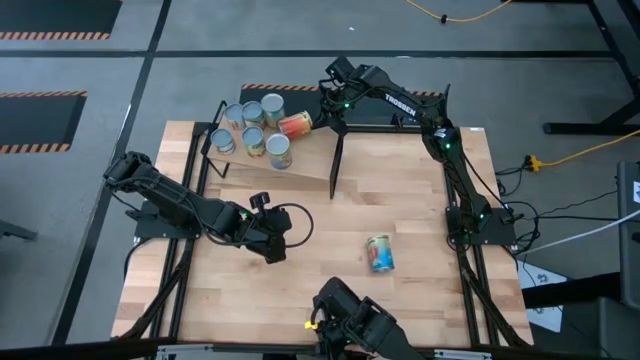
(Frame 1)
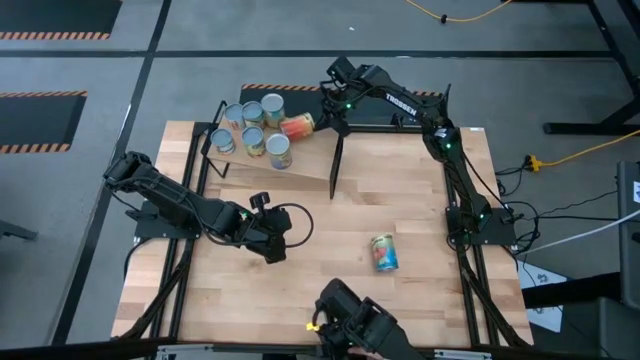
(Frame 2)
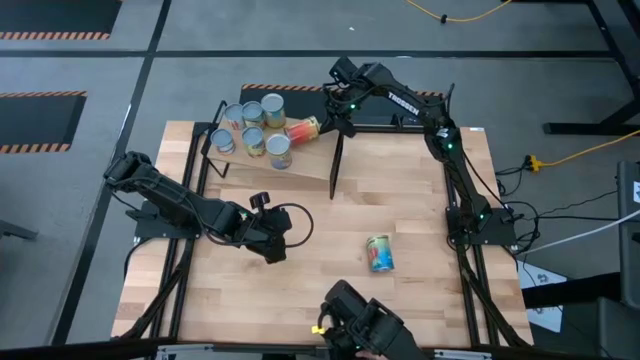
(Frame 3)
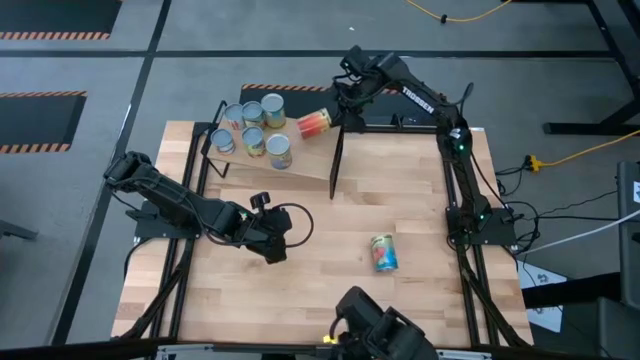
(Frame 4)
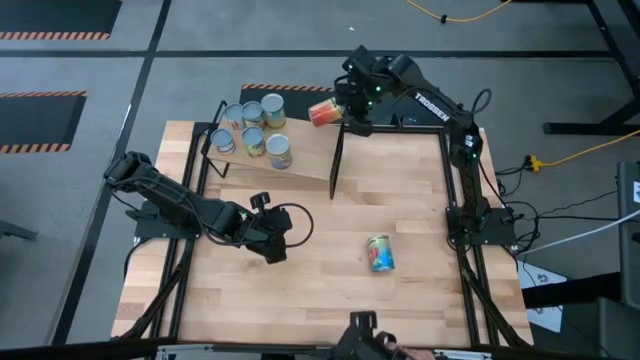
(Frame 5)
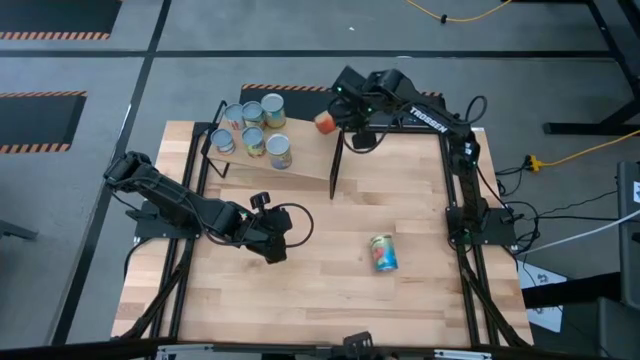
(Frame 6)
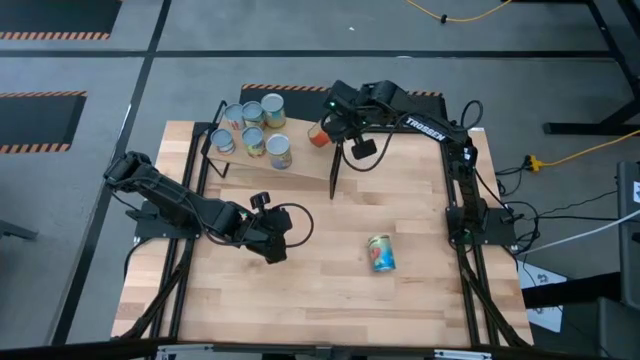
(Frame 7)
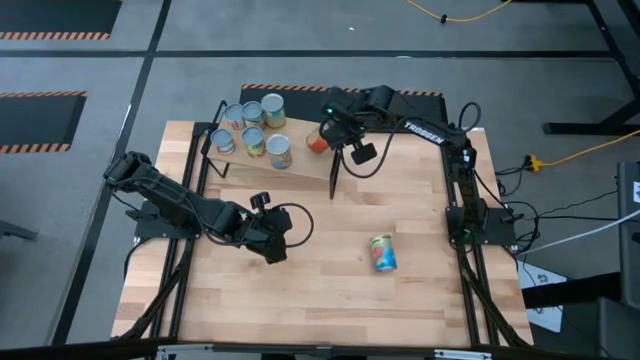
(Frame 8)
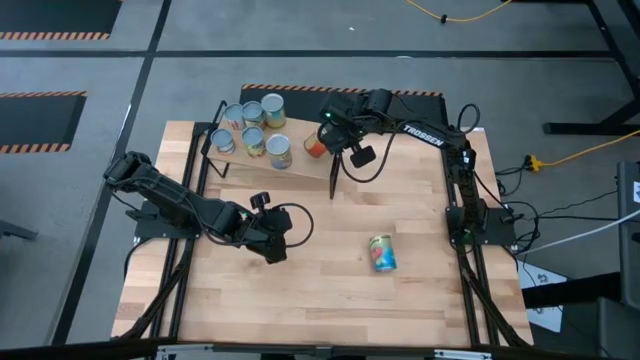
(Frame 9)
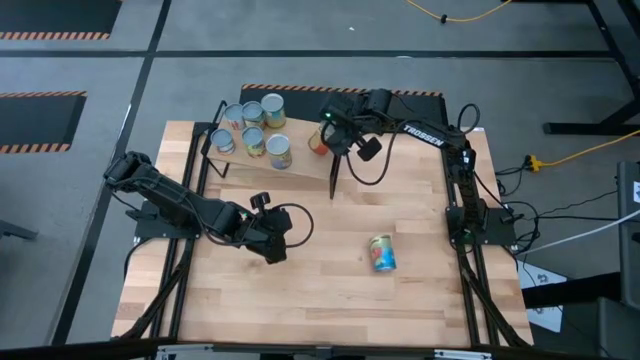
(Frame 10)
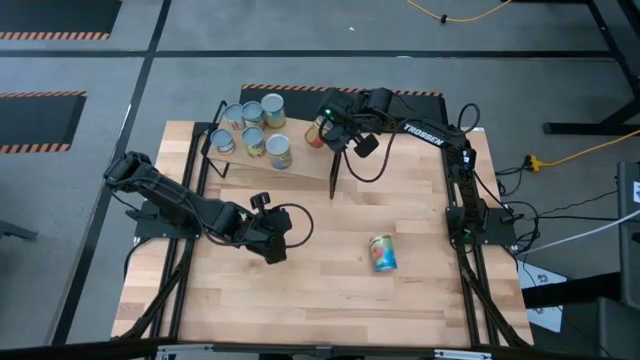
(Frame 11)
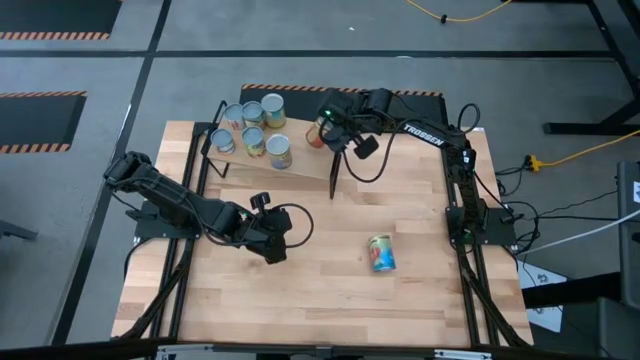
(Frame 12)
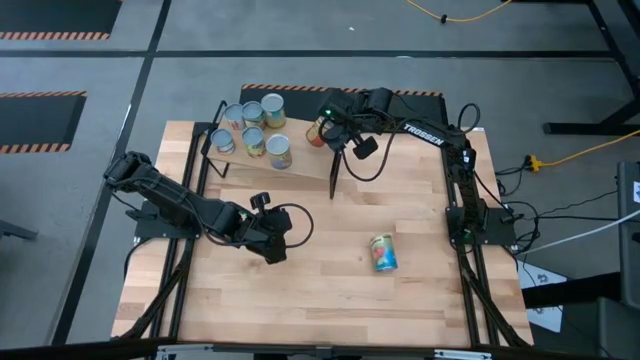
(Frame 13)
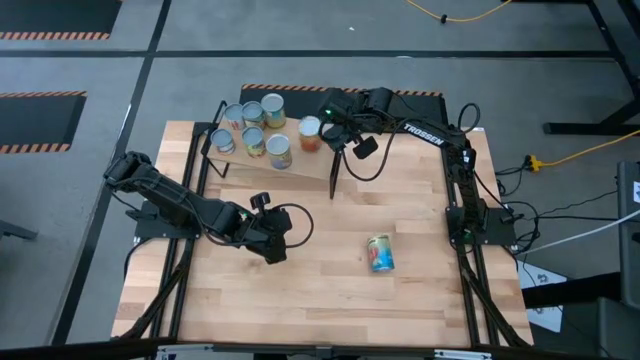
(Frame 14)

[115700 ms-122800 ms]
Task: Pick and place cans onto a shelf
Put the canned pineapple on the shelf

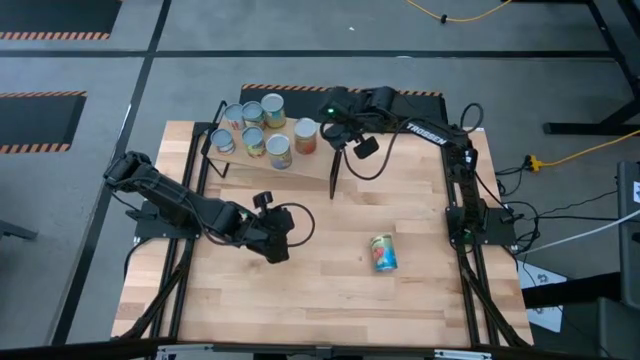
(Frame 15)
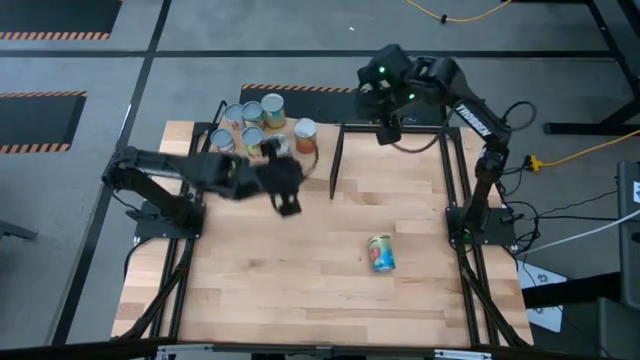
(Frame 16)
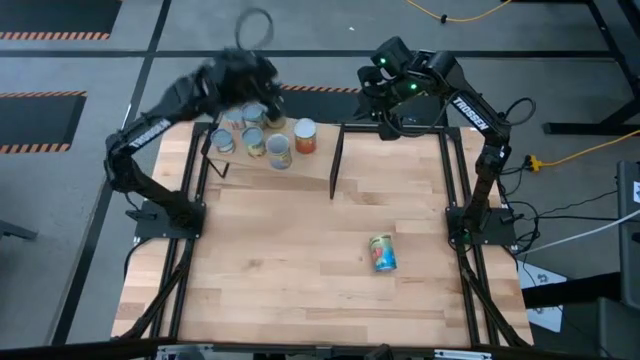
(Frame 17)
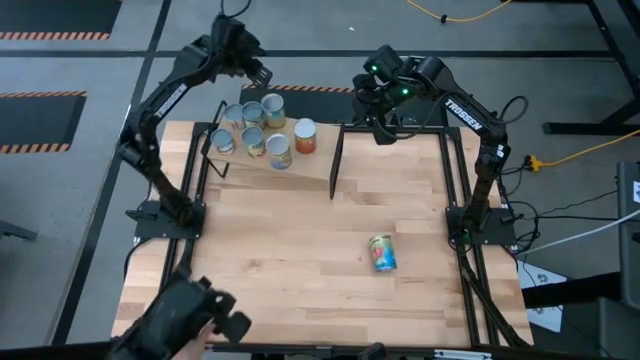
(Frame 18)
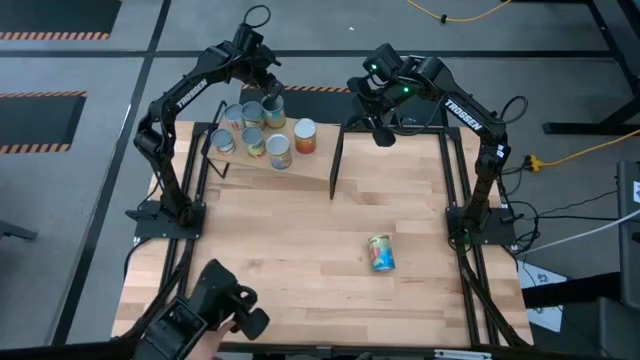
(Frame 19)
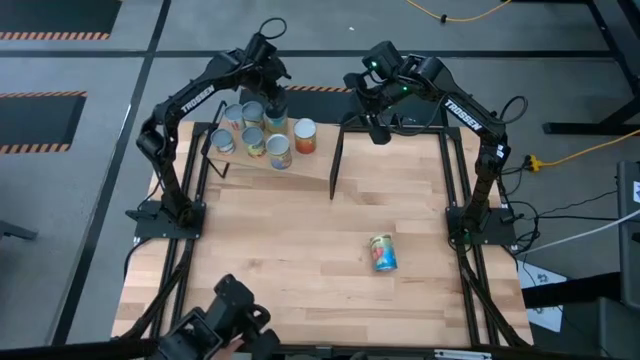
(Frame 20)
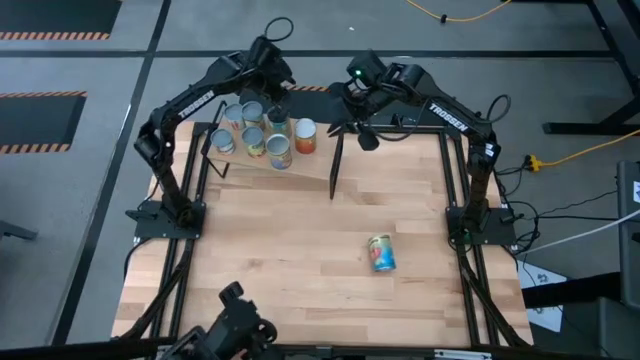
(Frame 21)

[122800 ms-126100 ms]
Adjust the canned chicken on the shelf

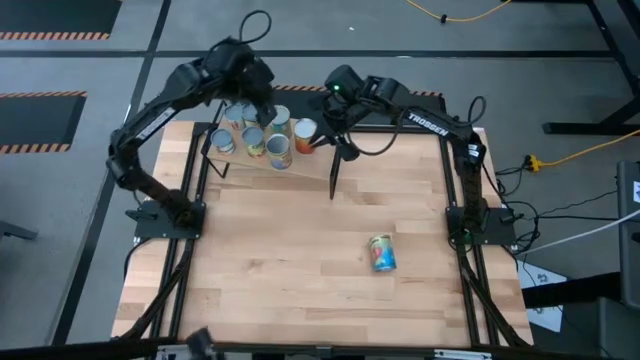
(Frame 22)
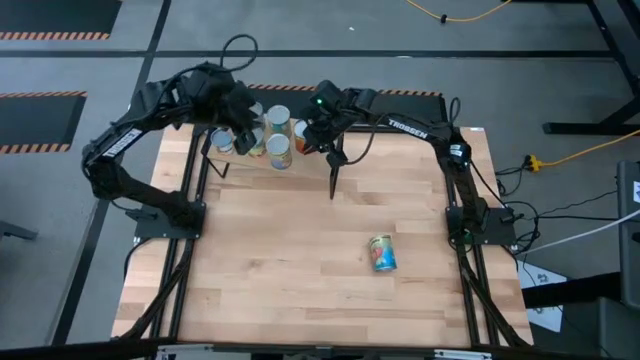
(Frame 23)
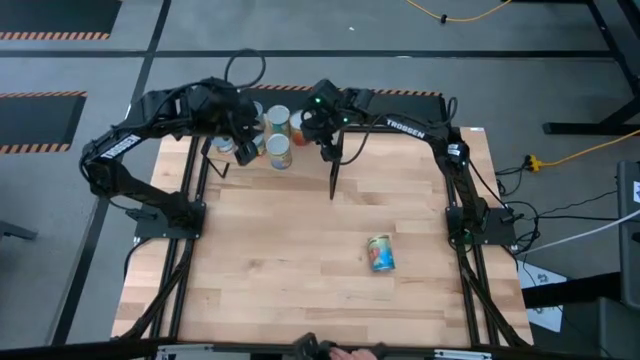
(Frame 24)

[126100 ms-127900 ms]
Adjust the canned pineapple on the shelf

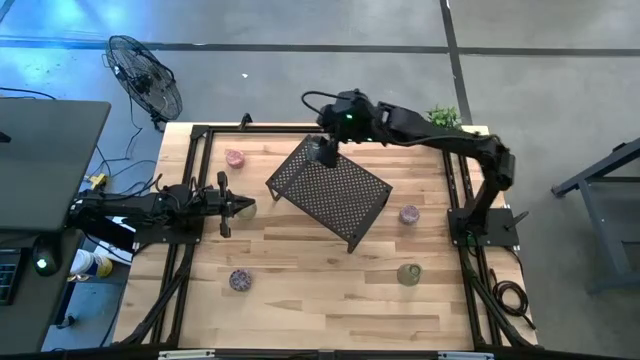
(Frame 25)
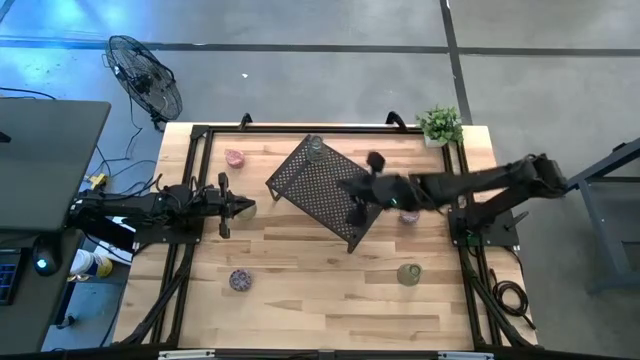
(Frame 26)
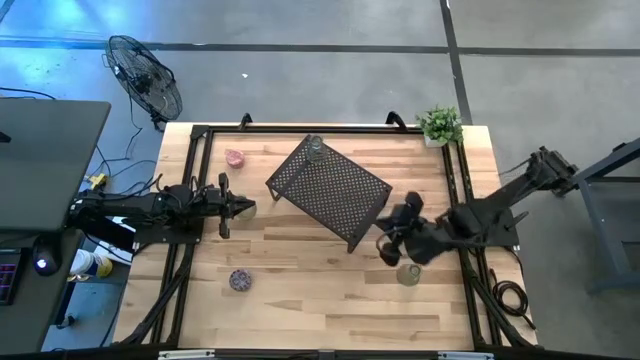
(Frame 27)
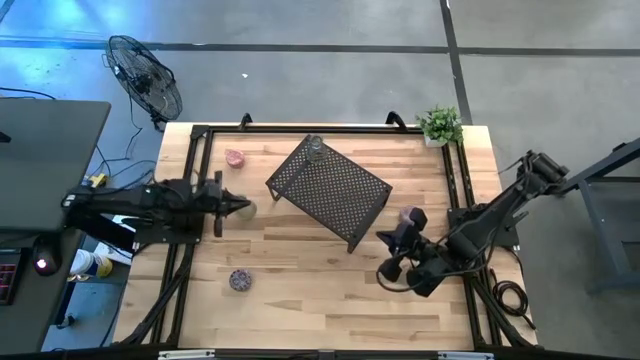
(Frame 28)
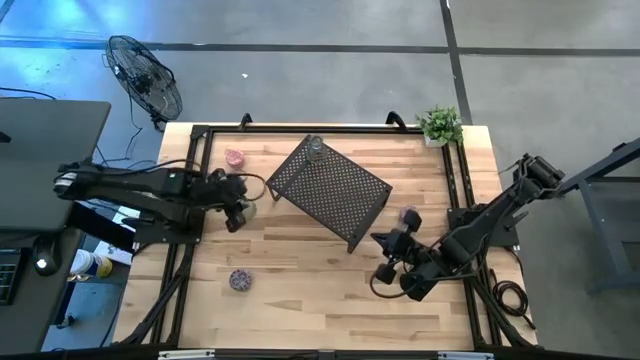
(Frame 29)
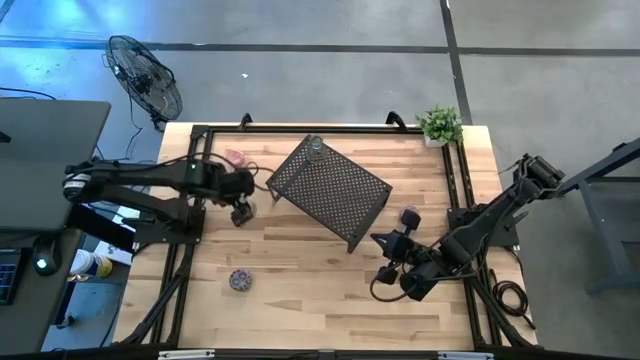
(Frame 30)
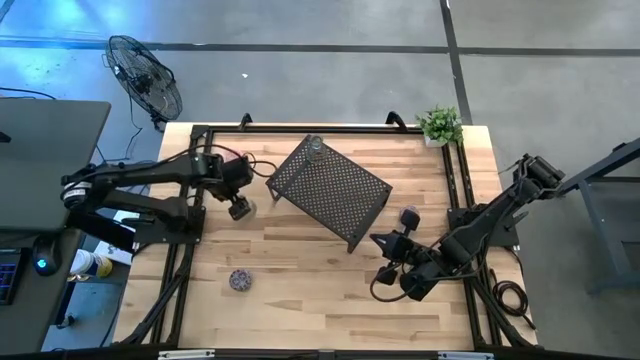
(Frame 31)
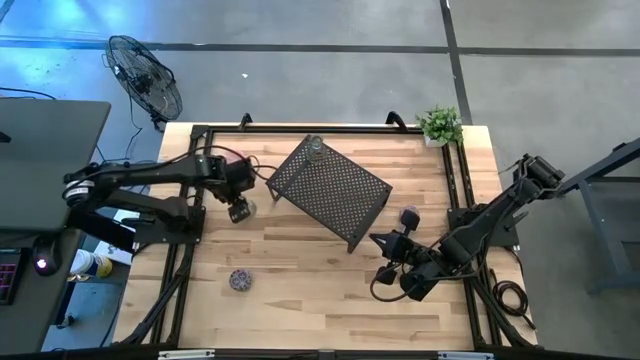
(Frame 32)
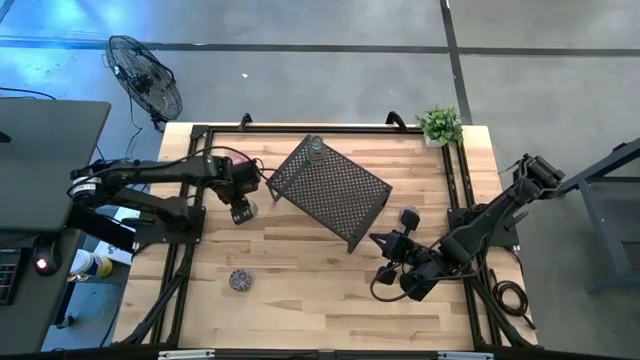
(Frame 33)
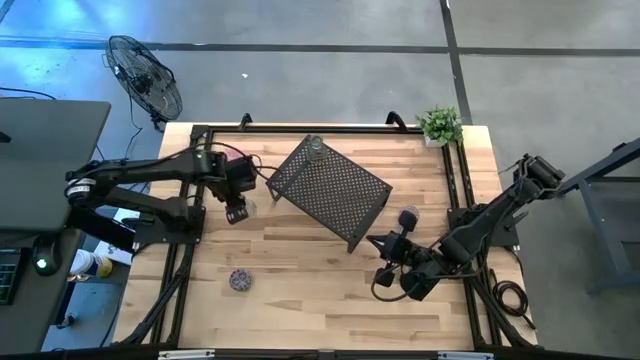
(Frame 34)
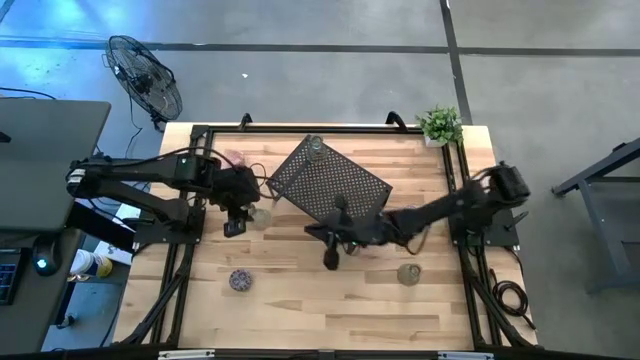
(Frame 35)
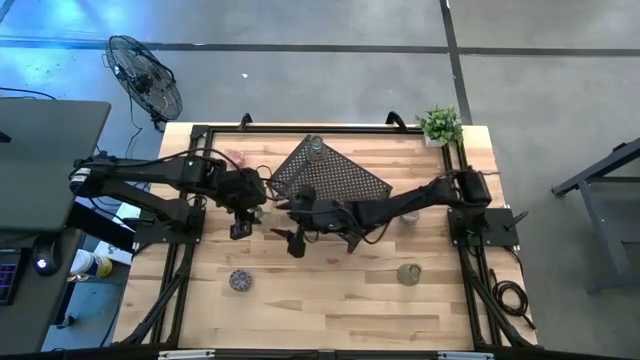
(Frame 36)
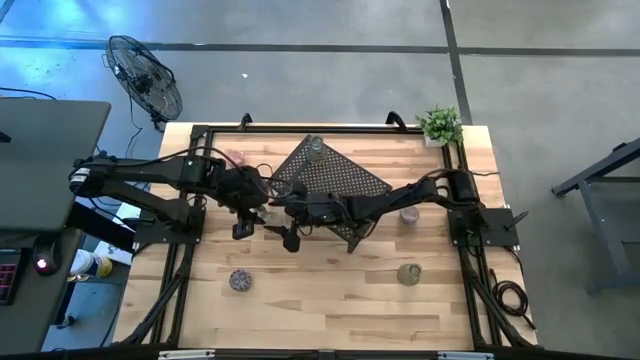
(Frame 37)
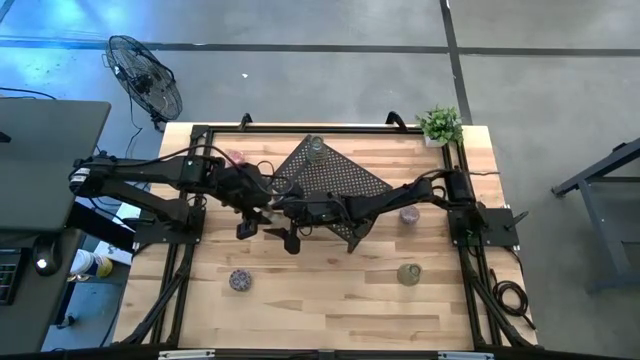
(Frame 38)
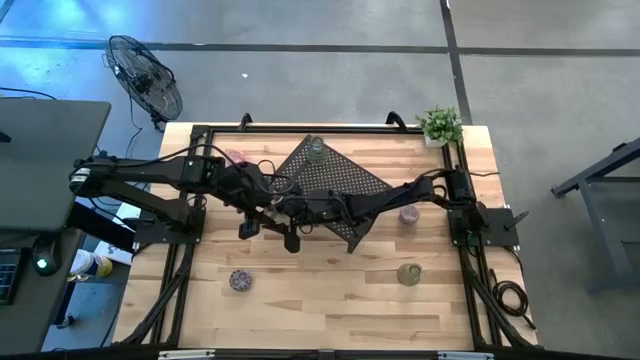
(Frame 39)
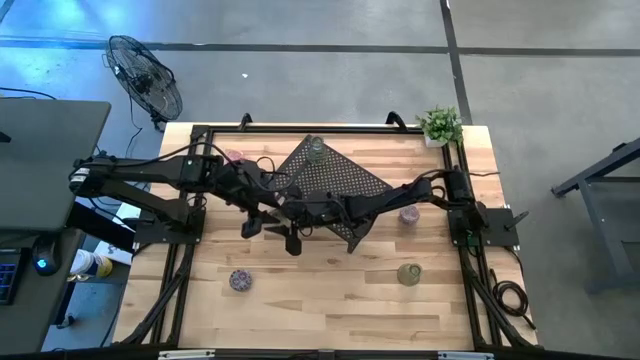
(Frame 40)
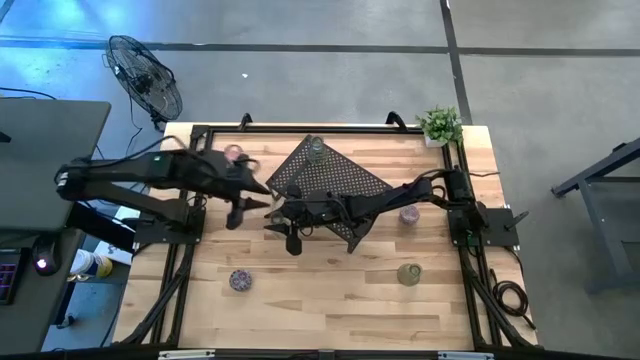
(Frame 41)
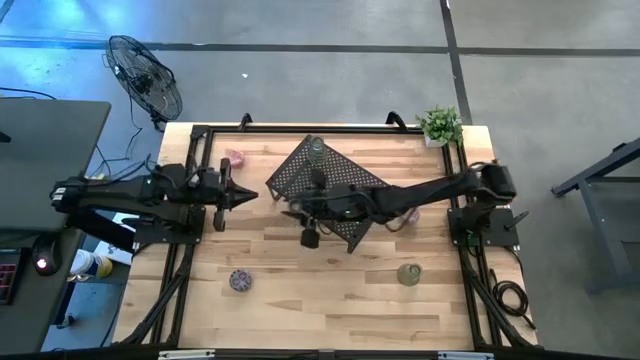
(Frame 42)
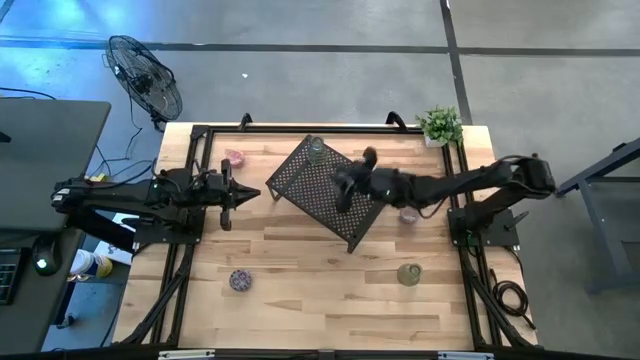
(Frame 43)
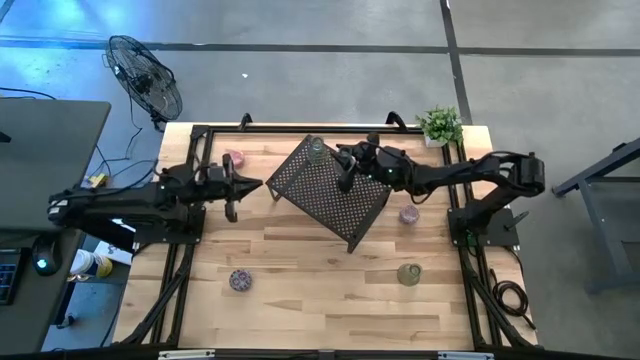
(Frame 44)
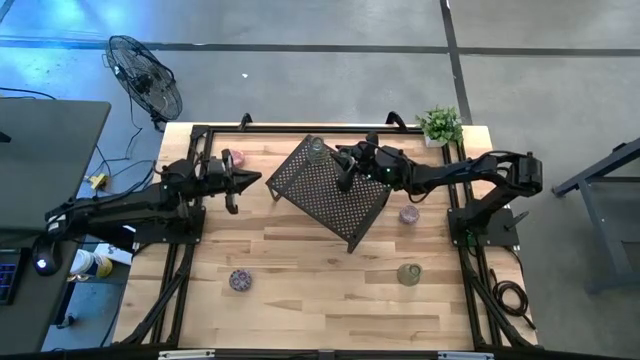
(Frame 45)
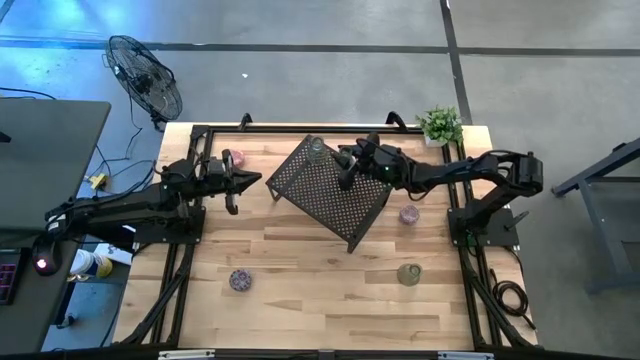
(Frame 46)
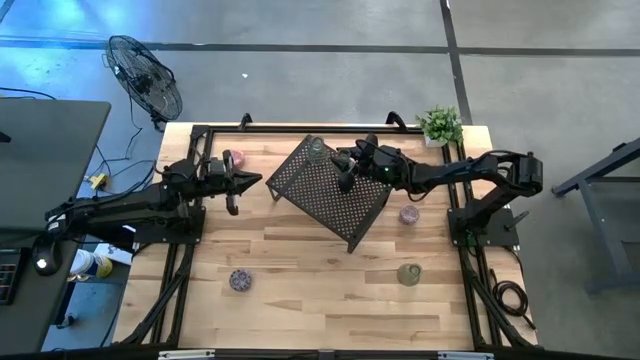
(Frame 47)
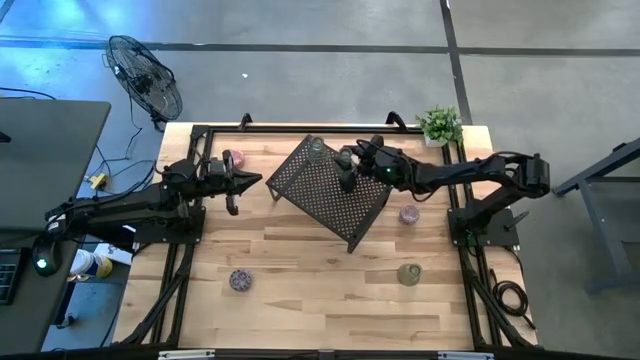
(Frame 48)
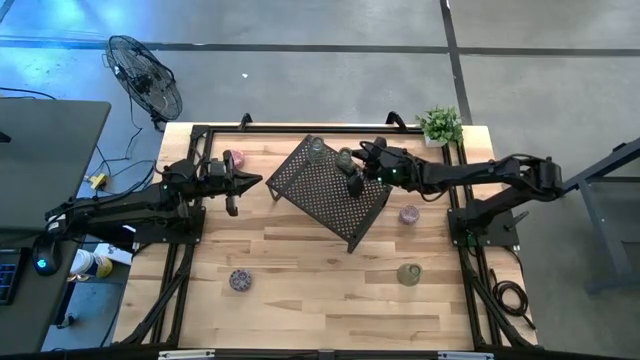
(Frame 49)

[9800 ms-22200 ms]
Task: Pick & Place candle stick holders
Put the left green candle holder on the shelf
